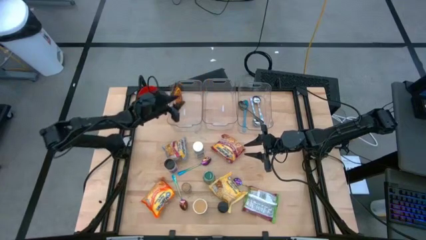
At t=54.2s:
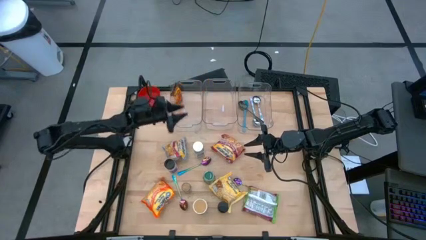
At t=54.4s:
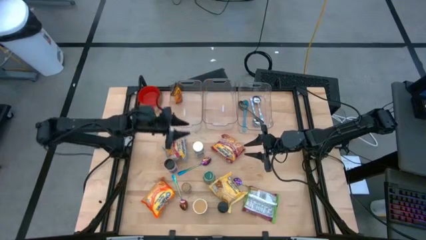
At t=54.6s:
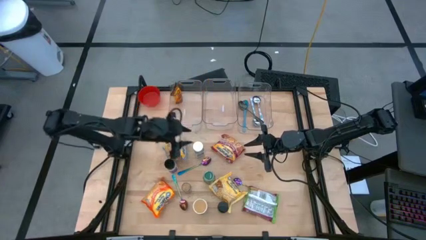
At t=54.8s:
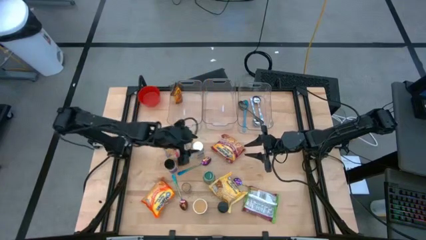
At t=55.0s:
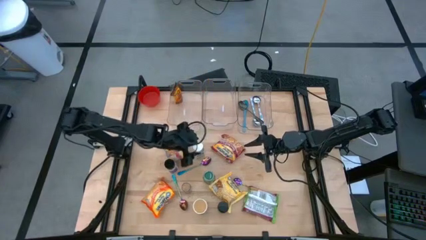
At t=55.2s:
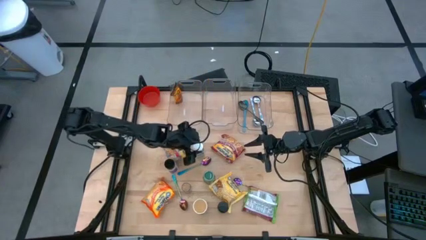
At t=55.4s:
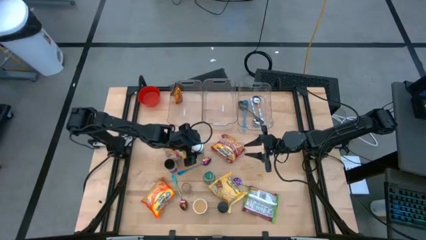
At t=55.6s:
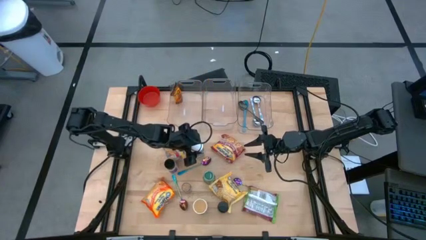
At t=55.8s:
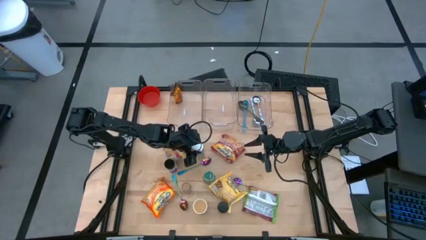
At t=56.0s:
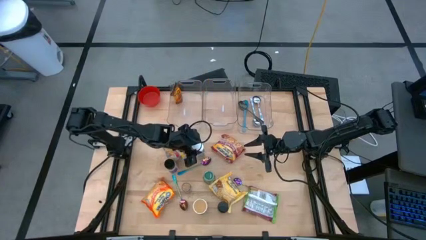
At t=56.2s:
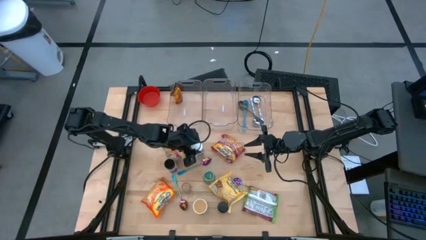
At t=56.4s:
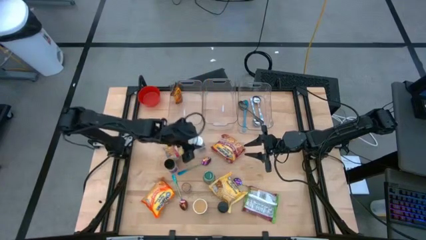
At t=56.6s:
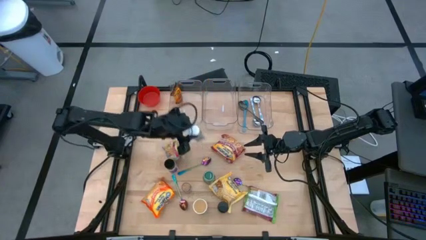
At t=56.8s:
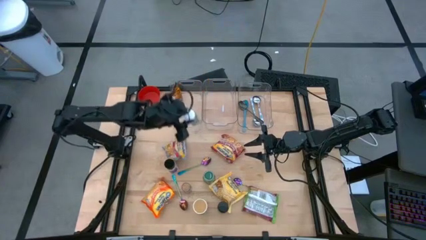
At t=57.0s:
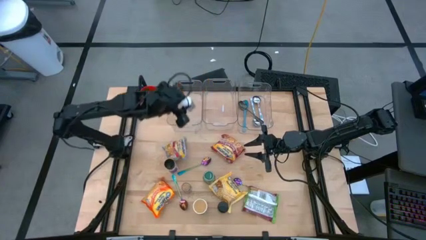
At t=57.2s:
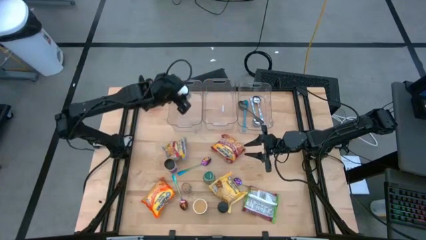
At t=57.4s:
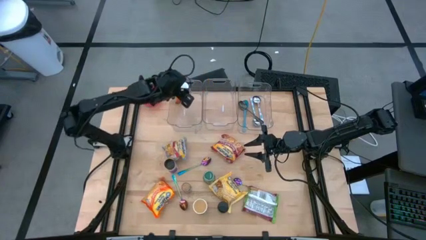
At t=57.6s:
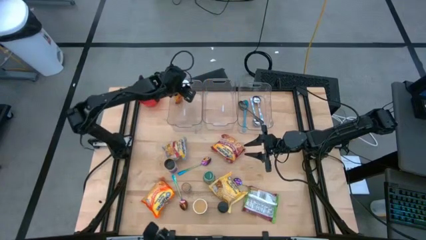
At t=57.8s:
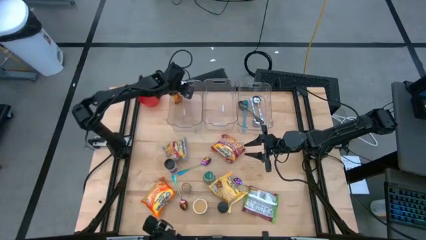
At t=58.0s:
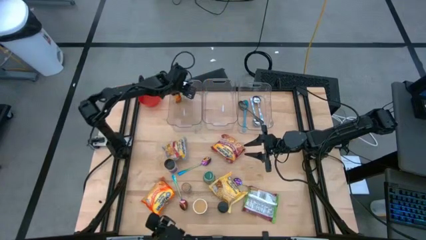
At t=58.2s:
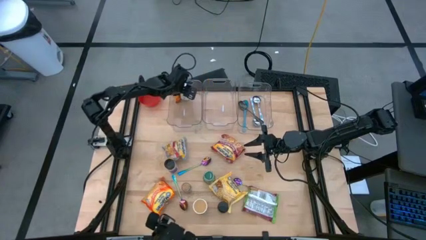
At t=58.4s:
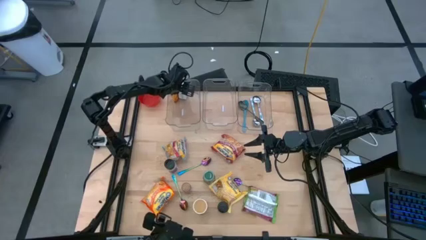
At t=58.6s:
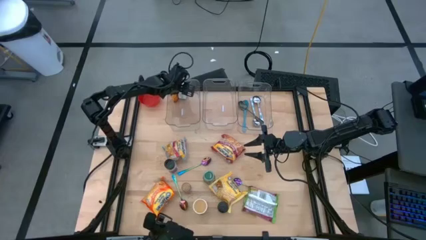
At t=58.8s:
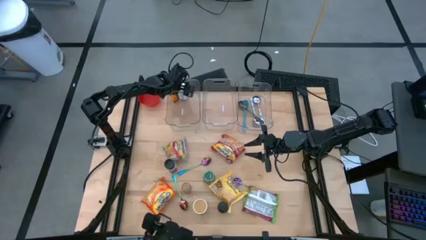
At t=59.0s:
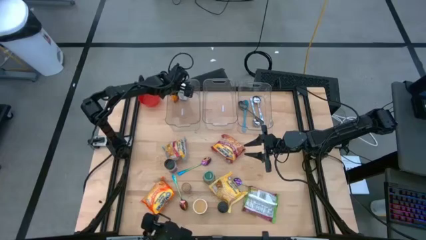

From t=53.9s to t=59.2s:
Task: Pick & Place Food Item
Put the white seasoning bottle into the left transparent bin

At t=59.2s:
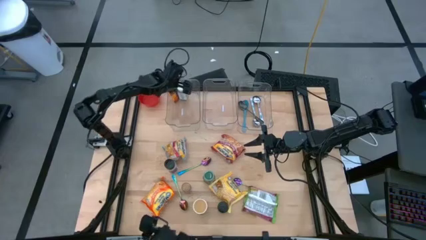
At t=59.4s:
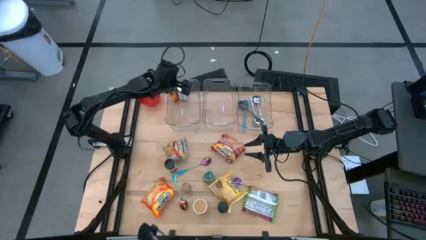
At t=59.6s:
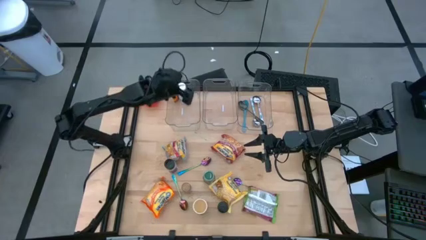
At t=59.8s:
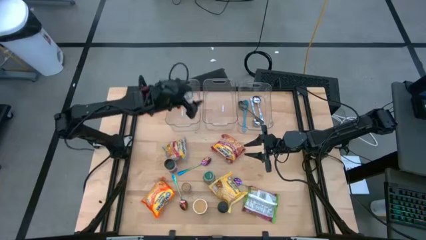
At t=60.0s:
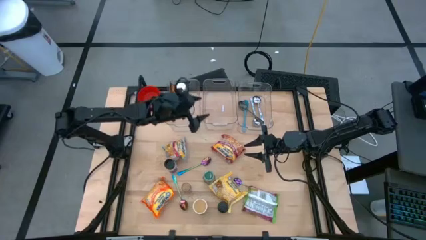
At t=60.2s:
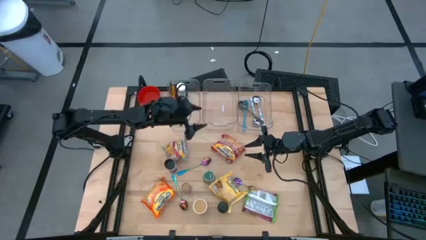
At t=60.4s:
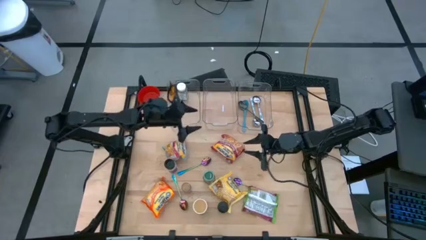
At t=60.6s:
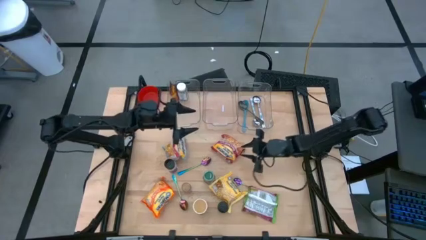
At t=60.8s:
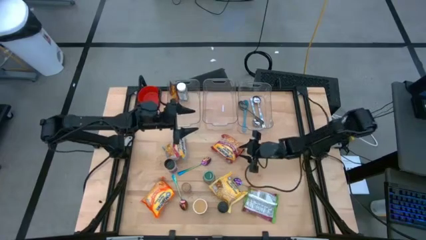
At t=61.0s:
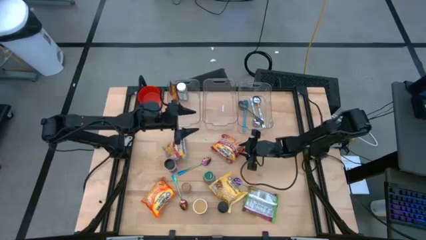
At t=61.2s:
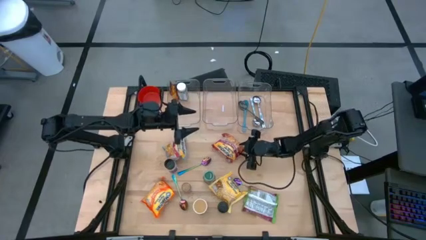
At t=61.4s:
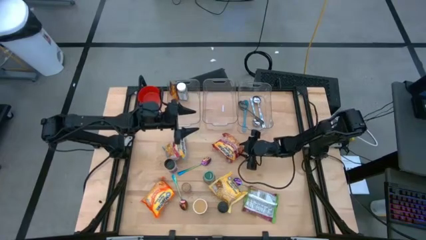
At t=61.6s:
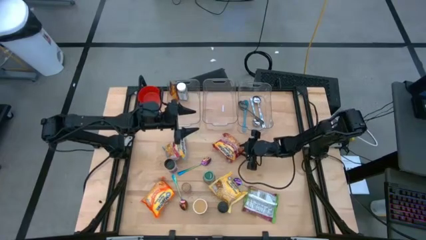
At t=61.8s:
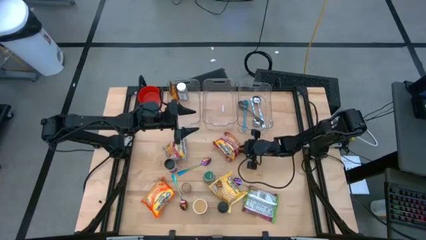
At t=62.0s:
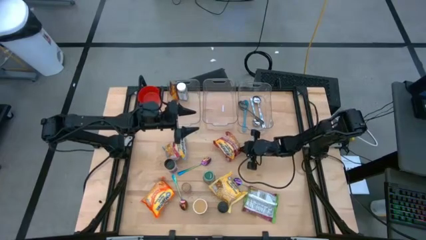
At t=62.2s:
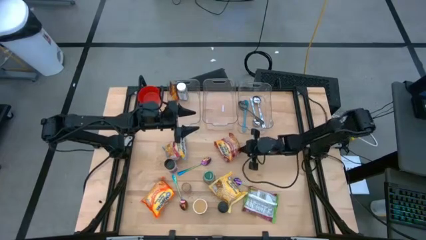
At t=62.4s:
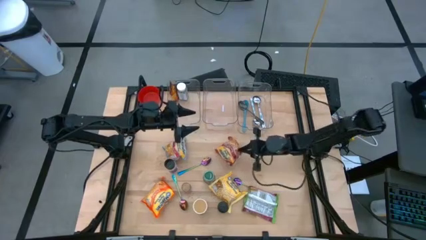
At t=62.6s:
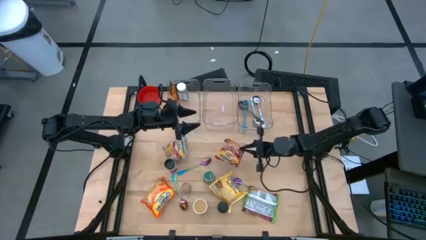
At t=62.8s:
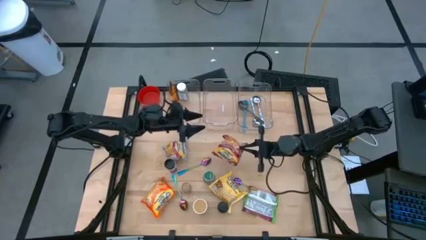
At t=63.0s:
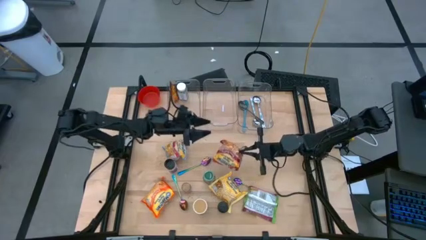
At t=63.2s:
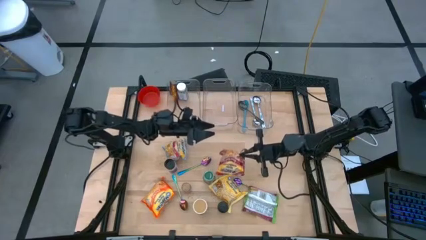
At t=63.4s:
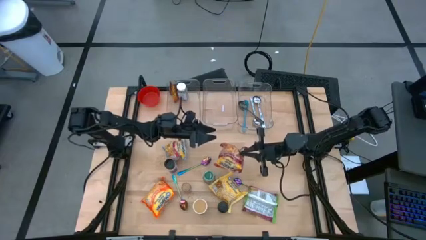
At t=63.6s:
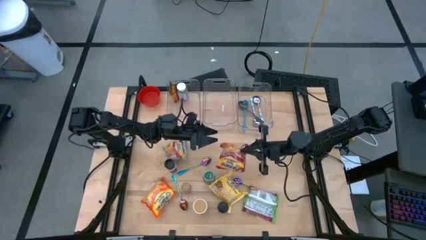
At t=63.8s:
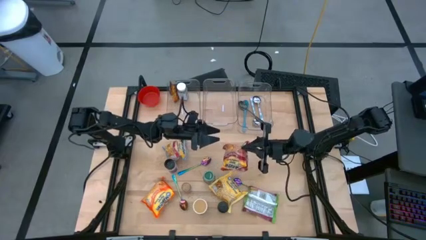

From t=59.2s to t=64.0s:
Put the red noodle pack into the middle transparent bin

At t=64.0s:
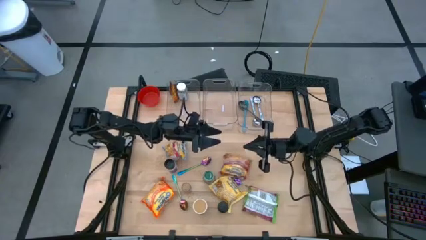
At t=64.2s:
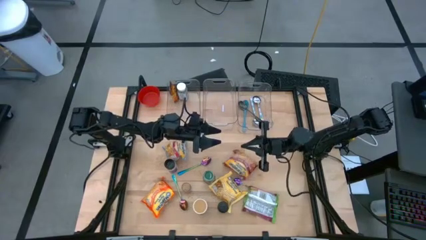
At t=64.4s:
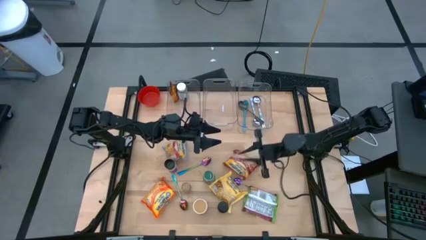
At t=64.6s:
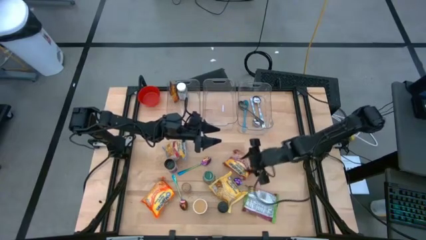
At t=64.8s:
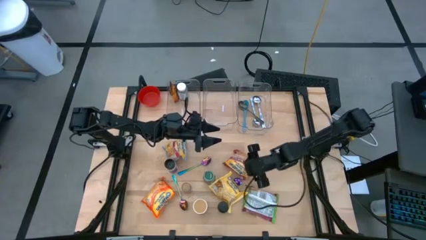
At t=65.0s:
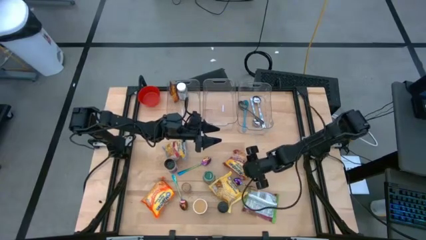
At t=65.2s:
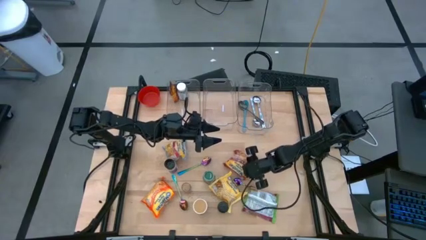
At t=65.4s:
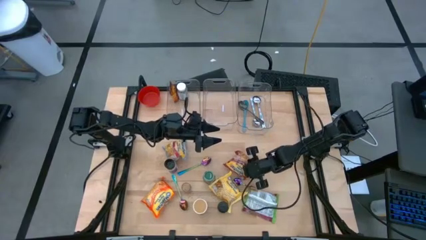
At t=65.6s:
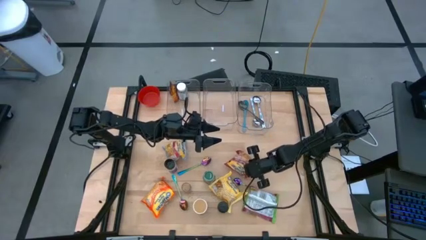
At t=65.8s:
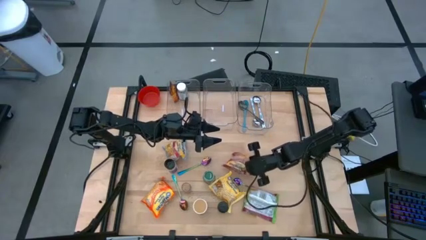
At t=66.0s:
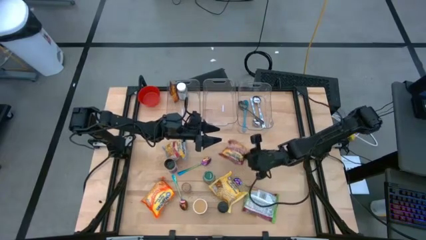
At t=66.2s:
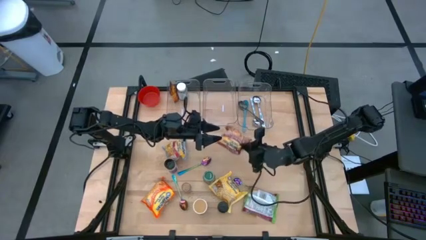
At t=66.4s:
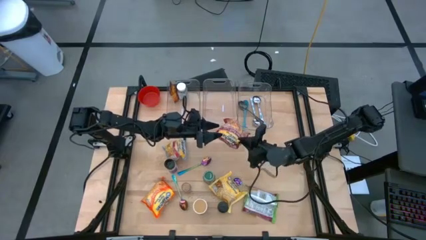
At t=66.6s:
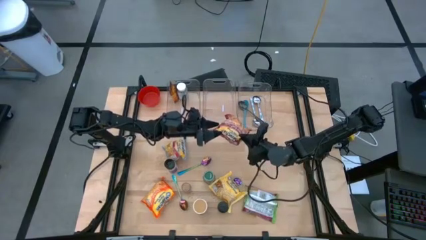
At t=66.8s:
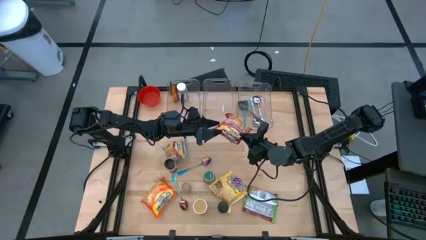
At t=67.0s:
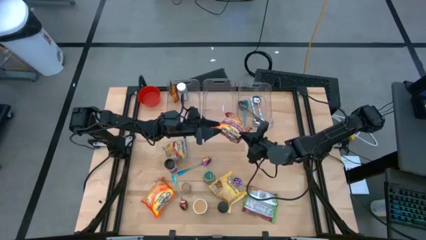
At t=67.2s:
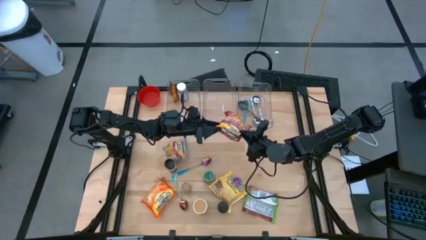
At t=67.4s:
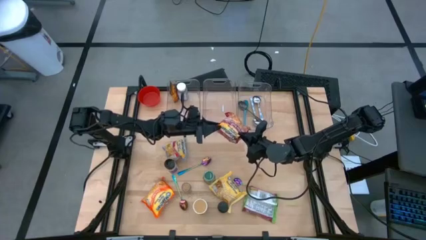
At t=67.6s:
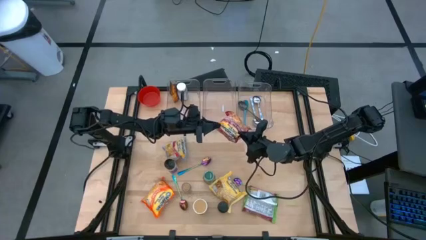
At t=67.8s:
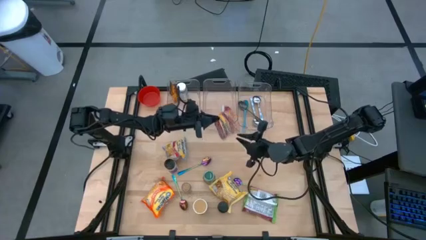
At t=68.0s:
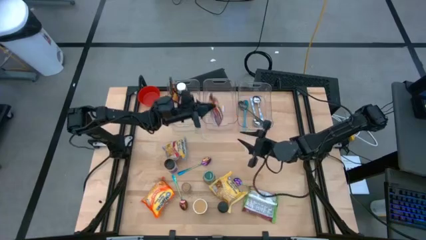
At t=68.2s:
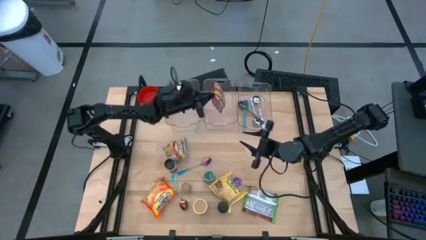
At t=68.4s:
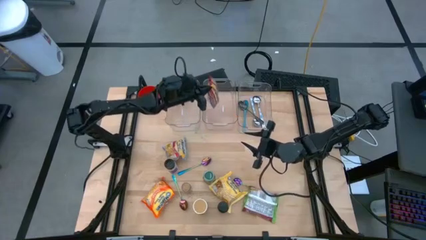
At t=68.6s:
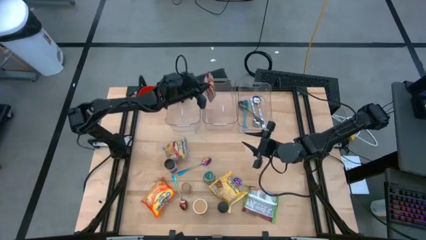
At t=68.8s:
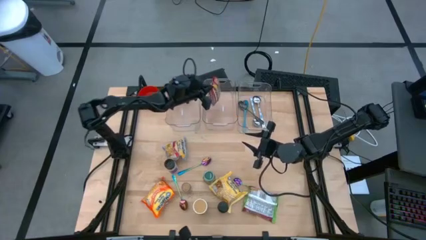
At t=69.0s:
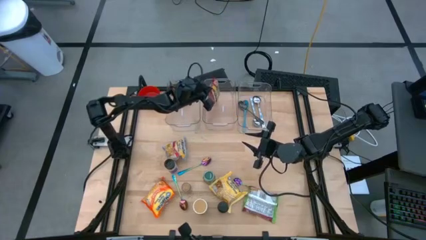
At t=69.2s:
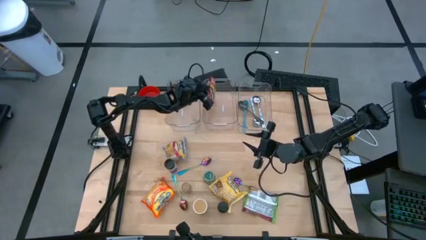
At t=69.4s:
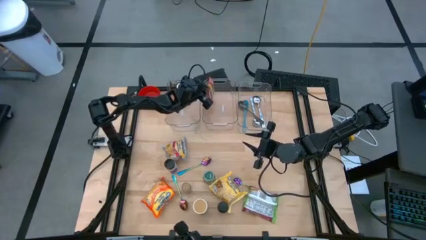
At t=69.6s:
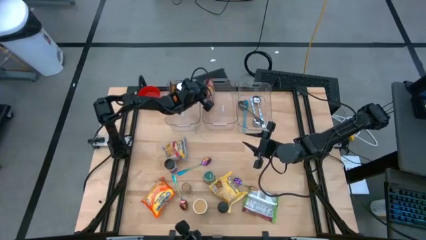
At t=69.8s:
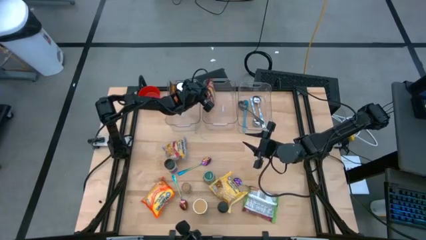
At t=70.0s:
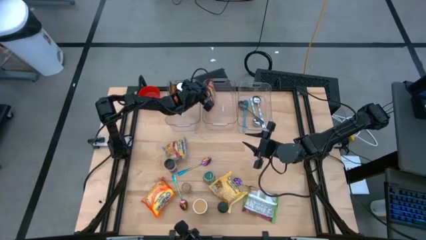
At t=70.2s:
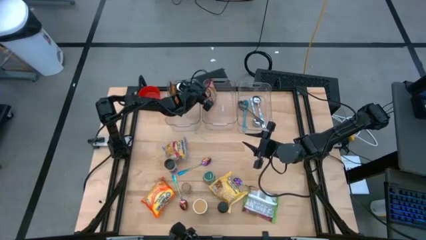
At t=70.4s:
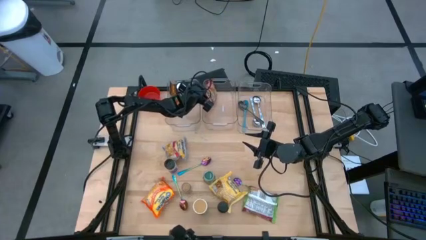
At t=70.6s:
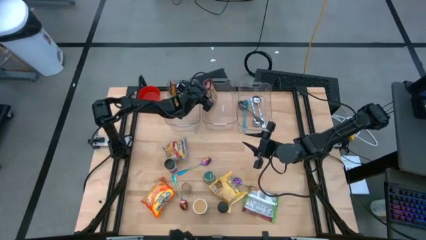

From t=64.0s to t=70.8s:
Put the red noodle pack into the middle transparent bin
